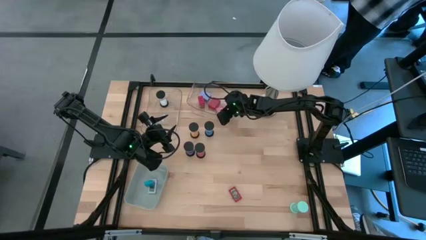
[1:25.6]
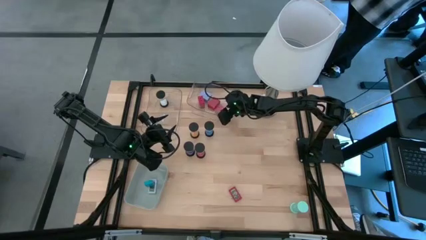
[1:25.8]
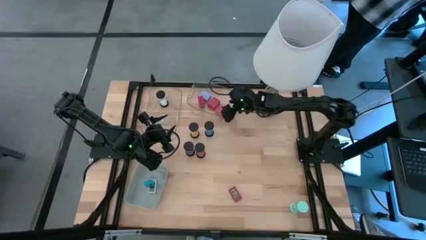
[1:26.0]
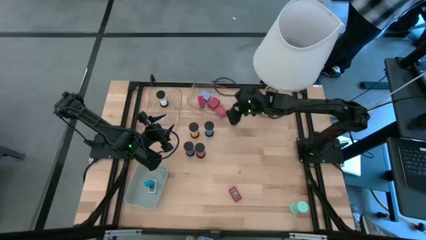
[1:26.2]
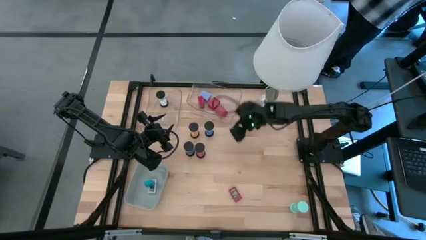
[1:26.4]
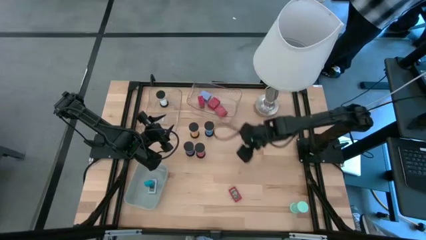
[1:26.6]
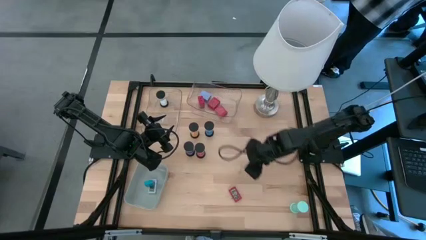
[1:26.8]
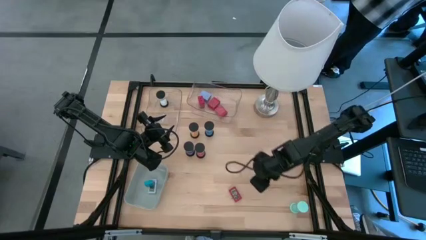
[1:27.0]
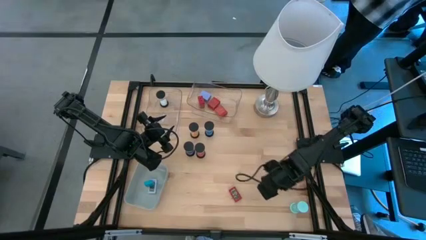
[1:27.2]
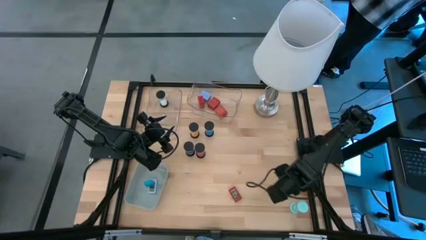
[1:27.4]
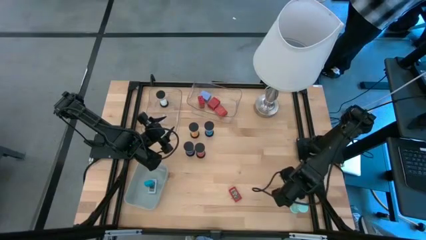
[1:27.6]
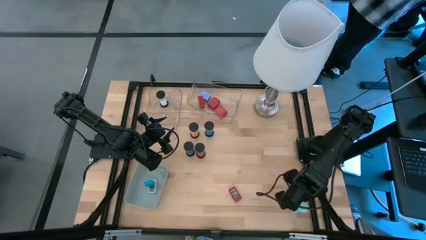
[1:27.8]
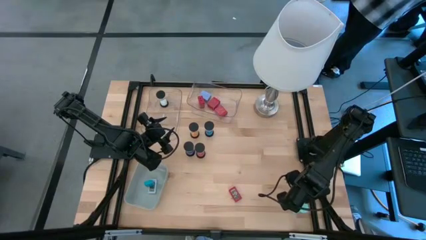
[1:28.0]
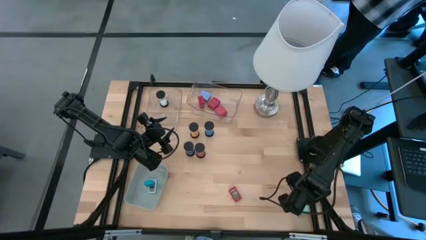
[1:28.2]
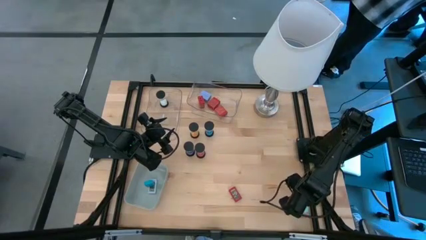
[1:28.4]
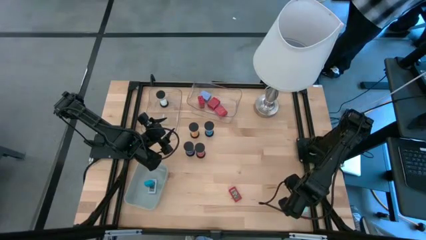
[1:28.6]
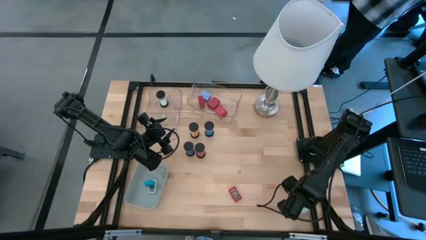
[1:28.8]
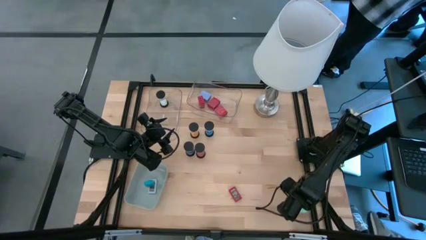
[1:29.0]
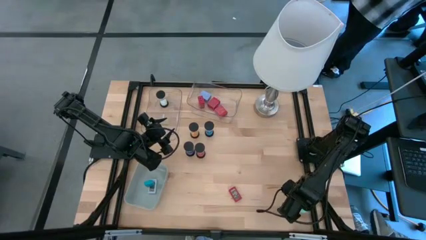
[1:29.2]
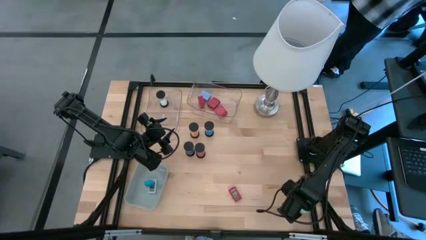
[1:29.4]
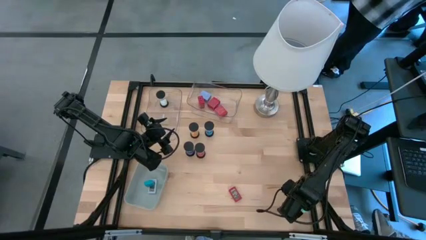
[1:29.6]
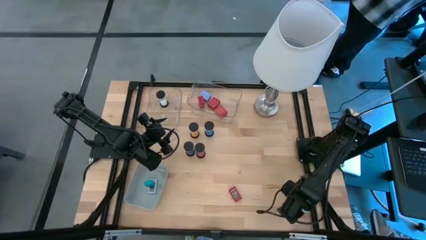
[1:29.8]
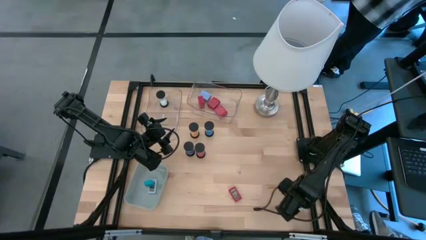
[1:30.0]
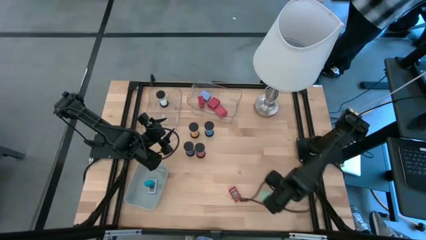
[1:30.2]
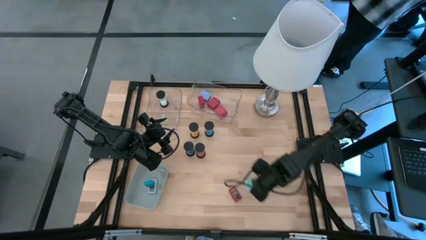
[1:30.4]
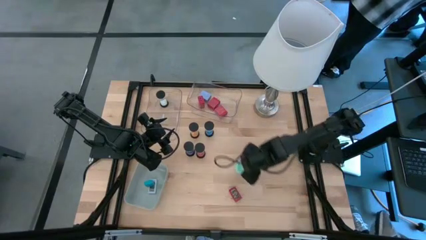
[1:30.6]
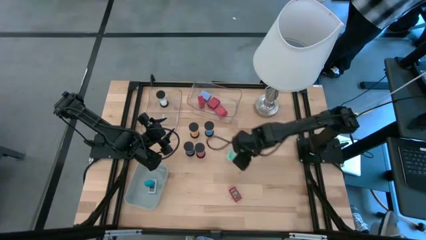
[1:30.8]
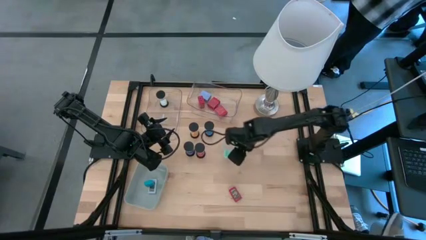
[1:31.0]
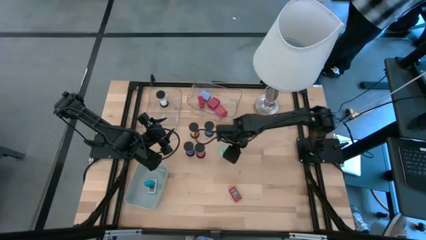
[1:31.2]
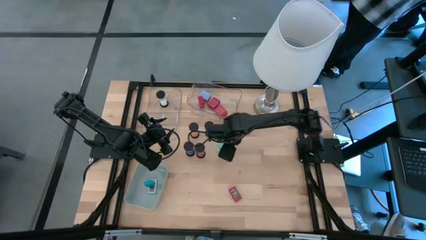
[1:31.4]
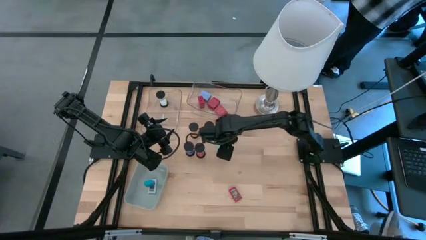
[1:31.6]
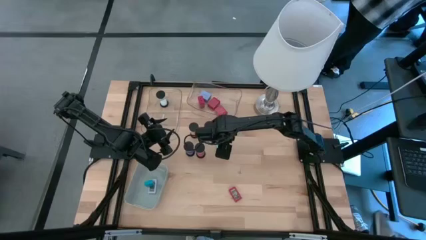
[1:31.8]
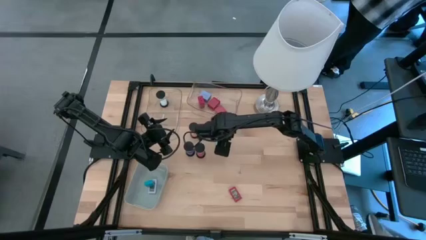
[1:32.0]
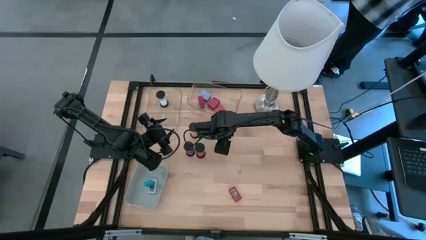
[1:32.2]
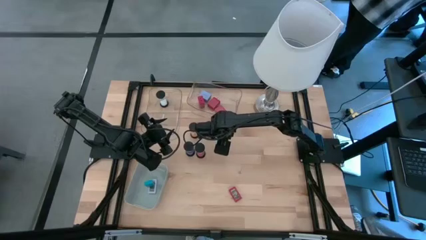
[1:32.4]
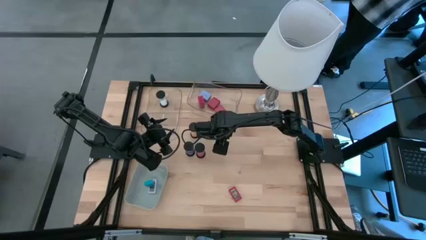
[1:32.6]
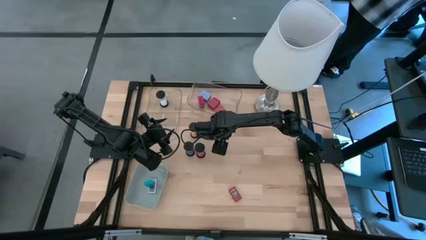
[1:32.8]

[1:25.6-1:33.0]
Task: Pick & Place Office items
Move the light blue hourglass from the bottom right to the center of the table

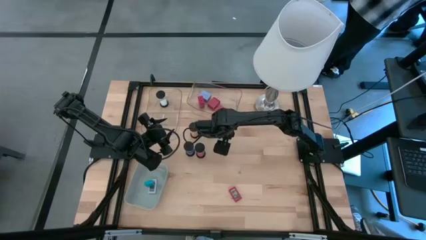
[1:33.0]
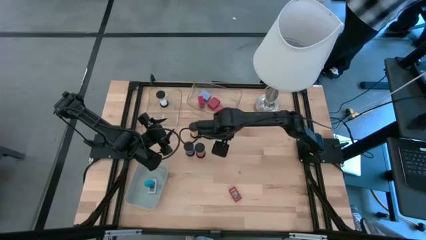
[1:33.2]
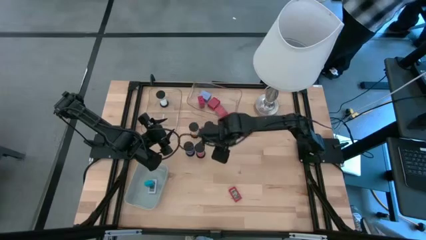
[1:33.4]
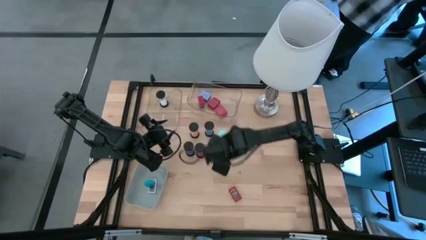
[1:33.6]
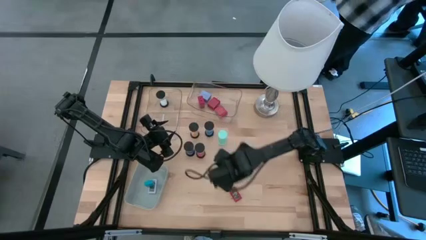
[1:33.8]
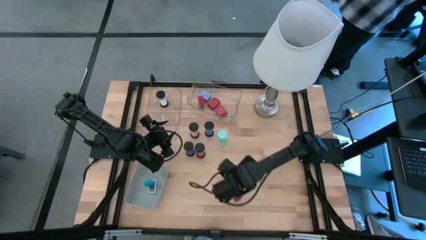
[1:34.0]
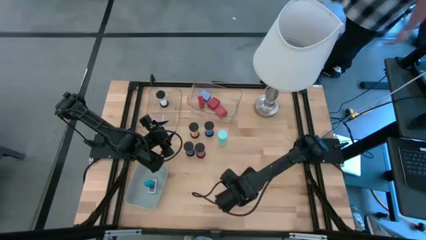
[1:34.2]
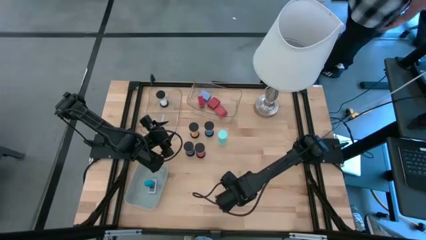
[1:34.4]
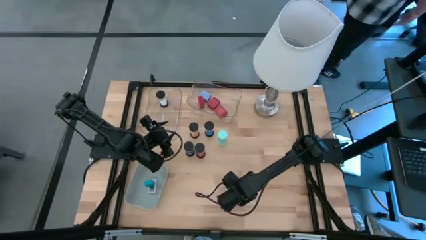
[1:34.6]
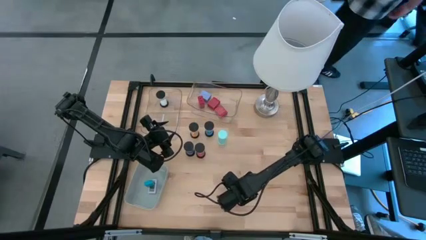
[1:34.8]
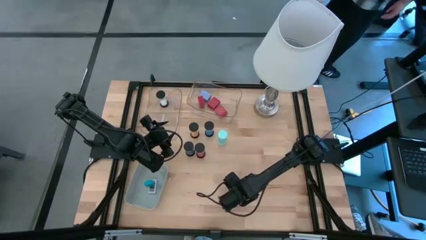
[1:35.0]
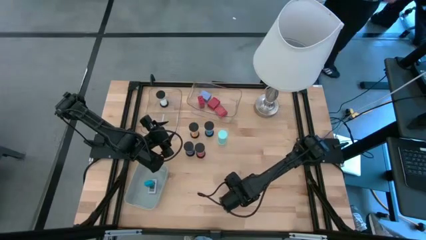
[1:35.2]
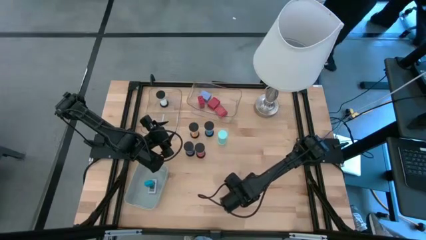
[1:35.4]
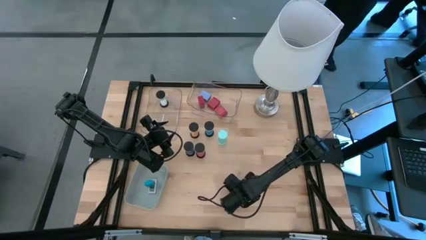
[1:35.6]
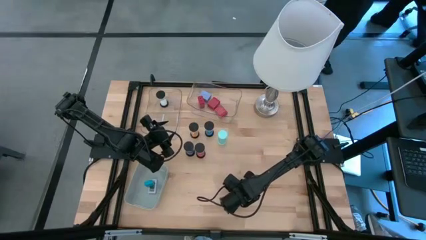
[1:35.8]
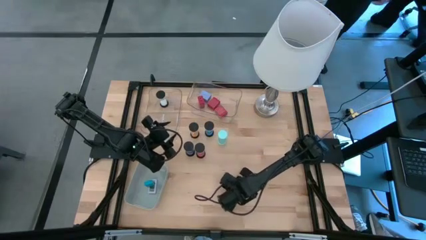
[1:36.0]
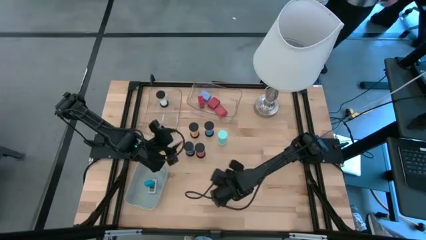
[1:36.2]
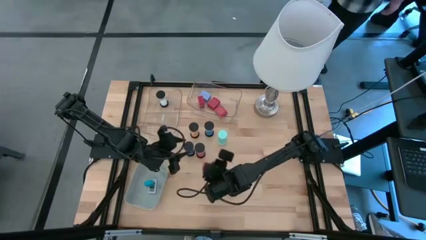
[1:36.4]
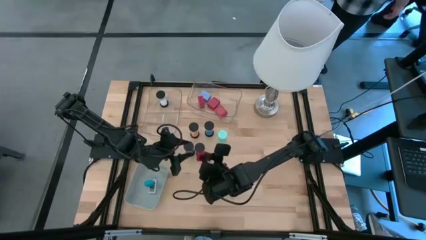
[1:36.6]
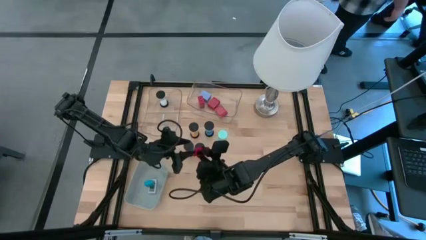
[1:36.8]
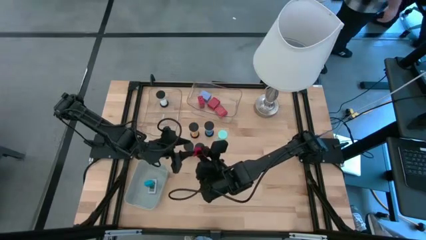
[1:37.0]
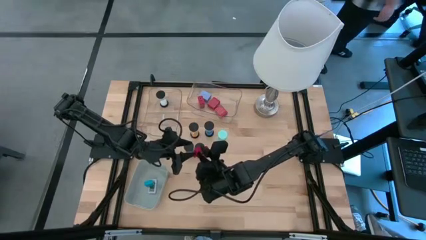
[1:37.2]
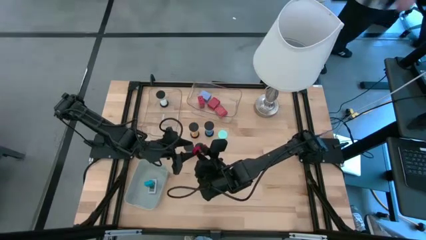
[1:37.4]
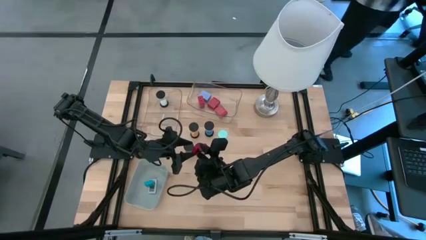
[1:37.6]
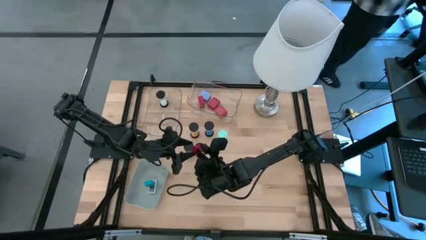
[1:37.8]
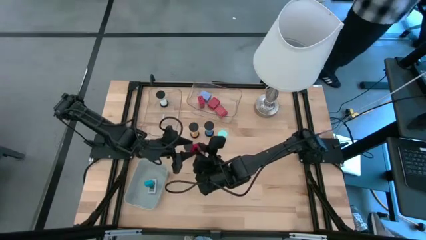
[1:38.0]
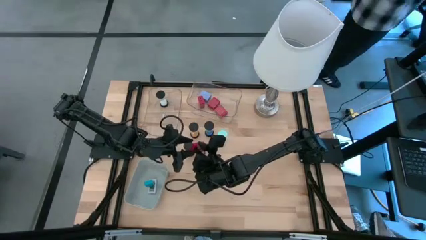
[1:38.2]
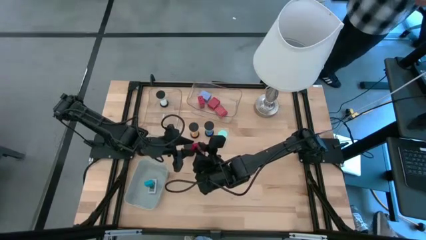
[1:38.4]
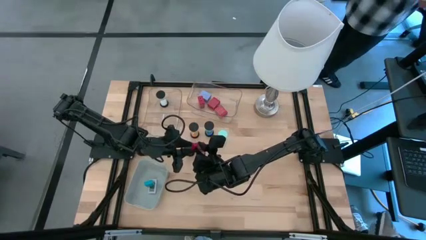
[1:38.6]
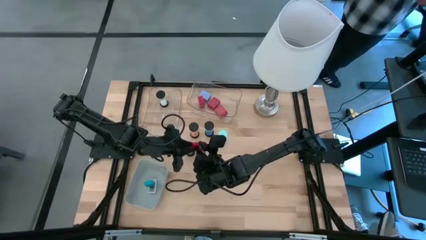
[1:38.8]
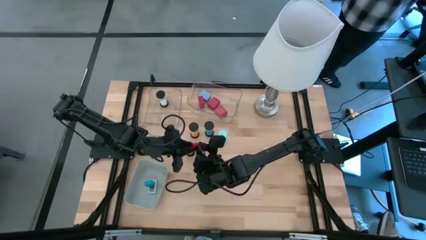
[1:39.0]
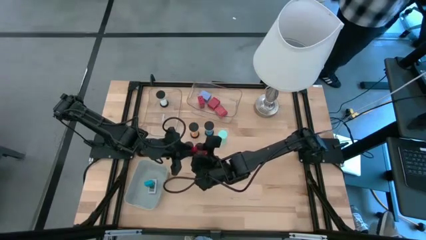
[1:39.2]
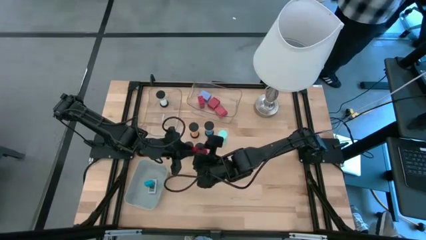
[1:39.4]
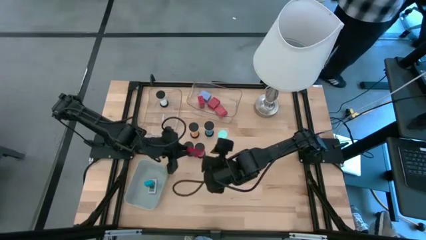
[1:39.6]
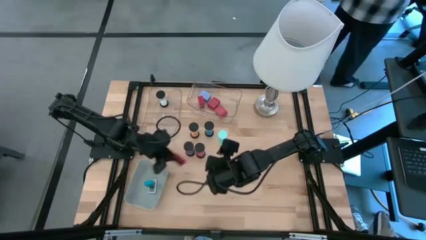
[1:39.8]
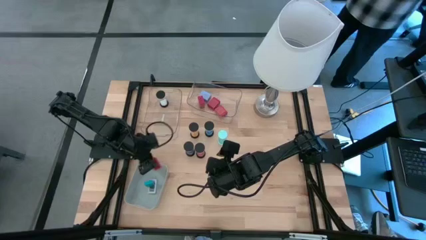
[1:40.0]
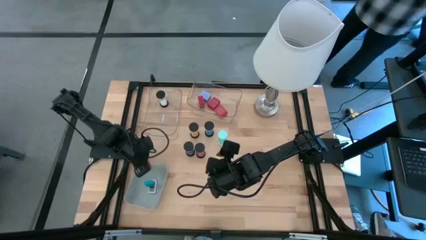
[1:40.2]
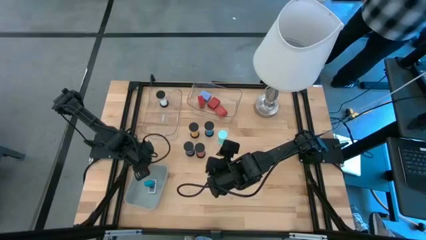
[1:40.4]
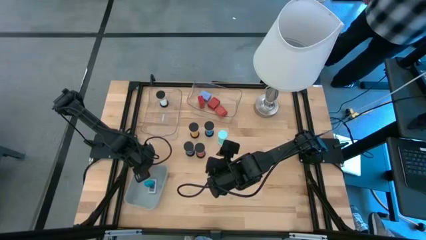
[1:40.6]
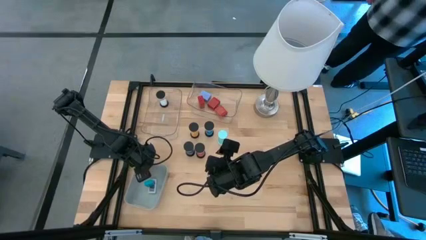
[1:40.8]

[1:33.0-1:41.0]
Put the red charger adapter into the right transparent bin

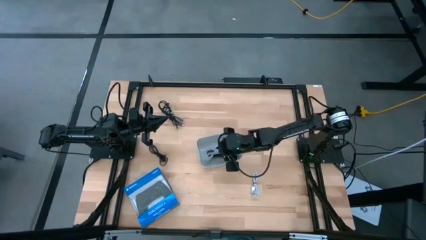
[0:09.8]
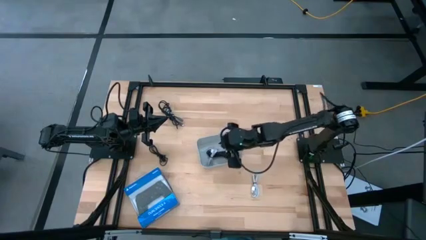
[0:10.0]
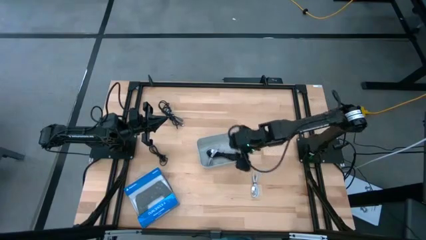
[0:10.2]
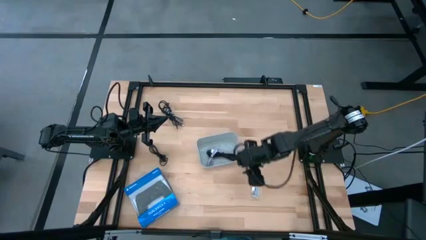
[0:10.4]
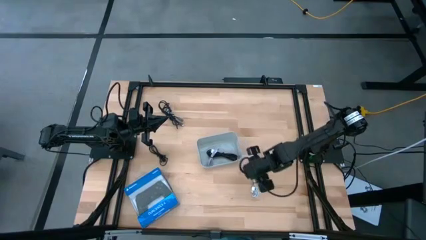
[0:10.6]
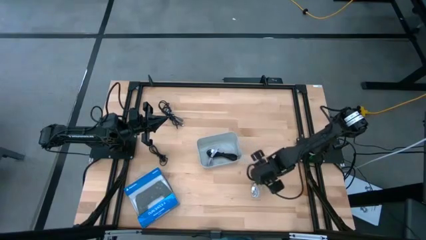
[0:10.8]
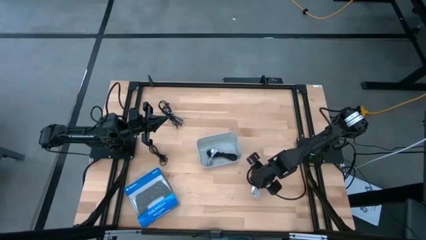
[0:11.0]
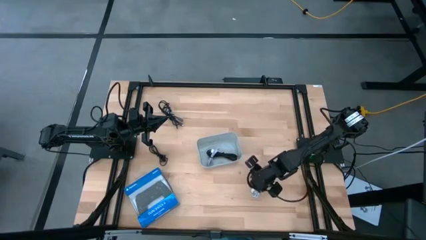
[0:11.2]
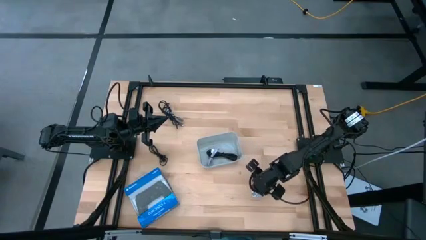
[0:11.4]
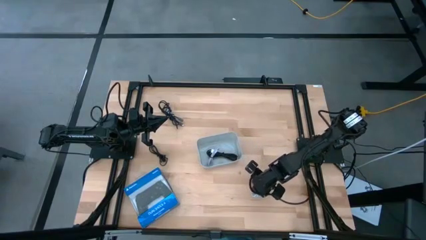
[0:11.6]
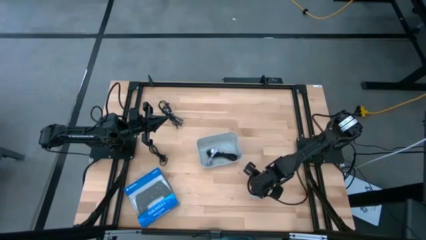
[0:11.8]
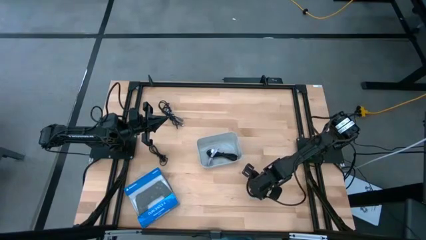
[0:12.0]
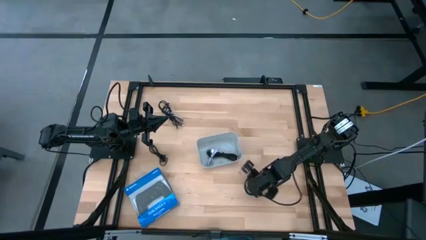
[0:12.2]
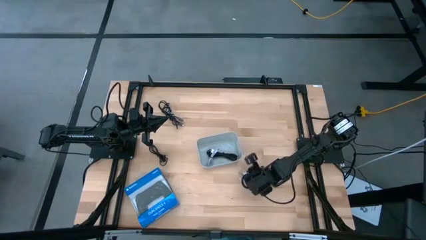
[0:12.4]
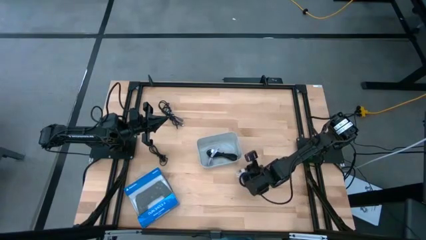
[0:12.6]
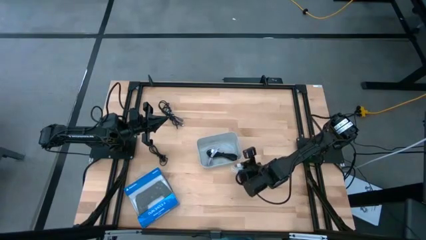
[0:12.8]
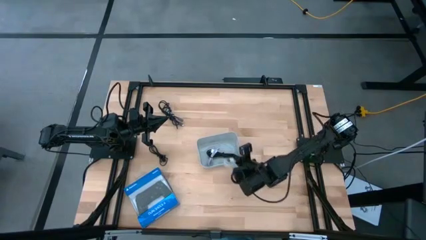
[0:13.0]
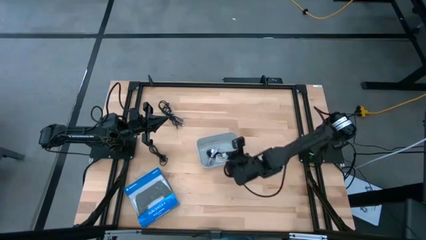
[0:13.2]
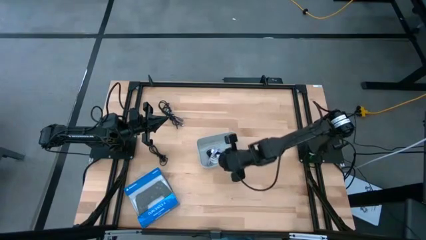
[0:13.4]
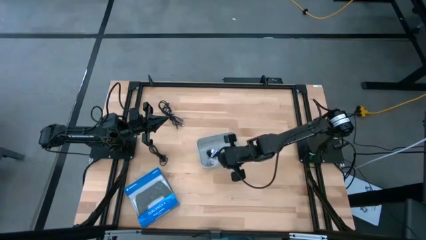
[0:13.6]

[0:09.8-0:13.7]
Task: Pick and place USB-C Cables
Put the white charger cable into the gray bin
